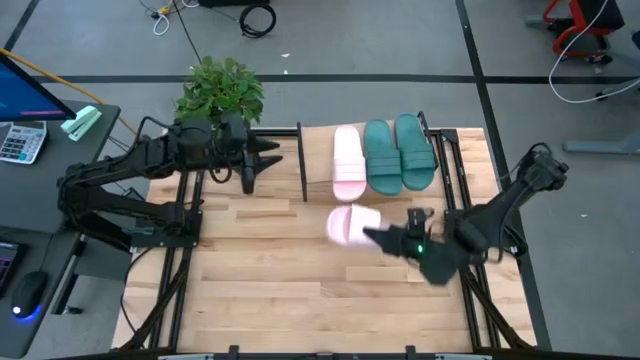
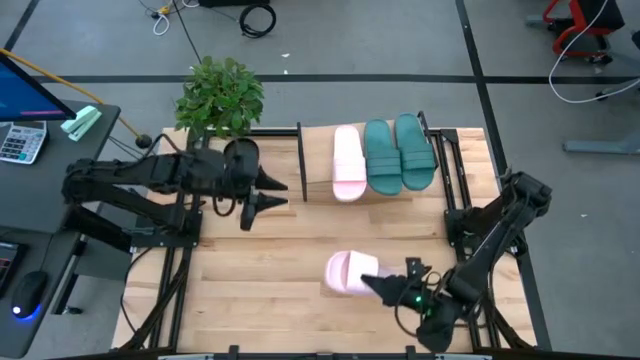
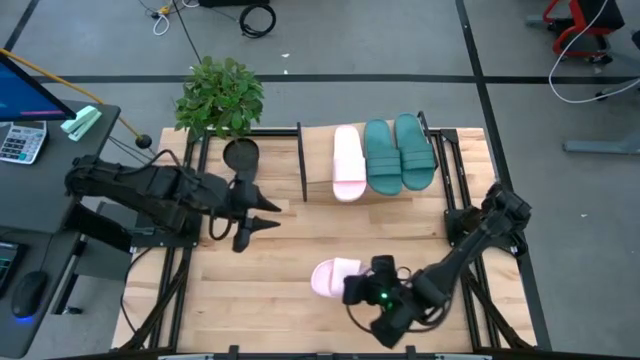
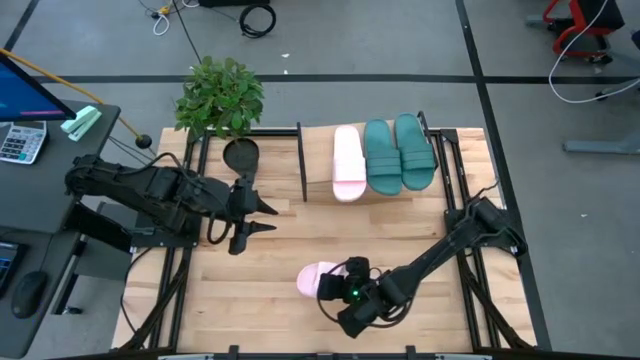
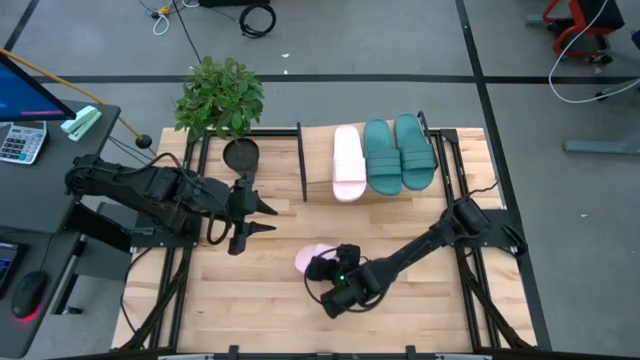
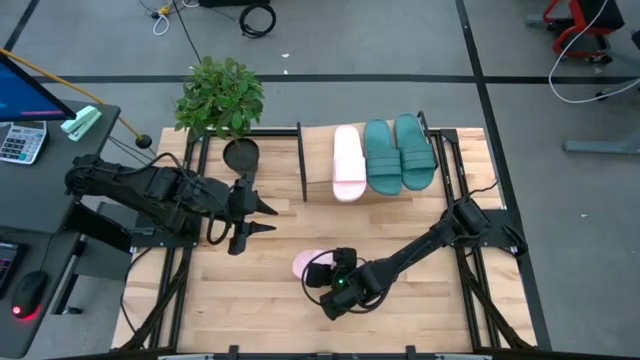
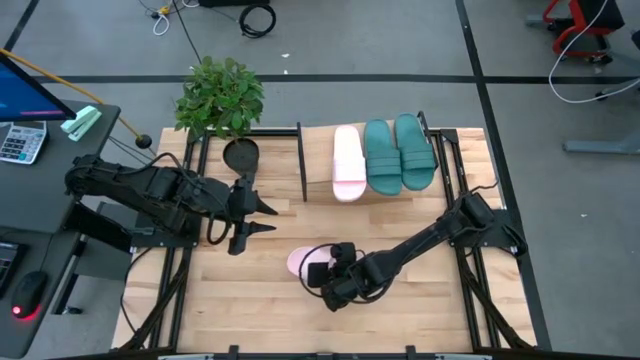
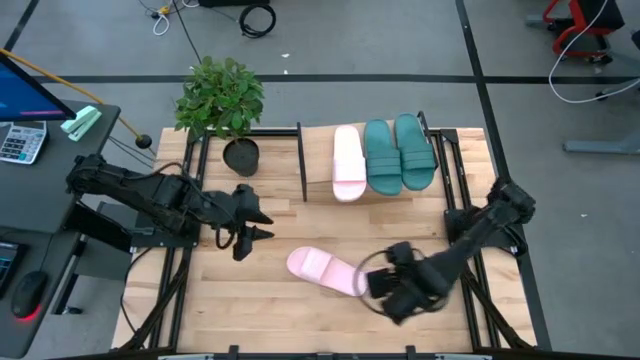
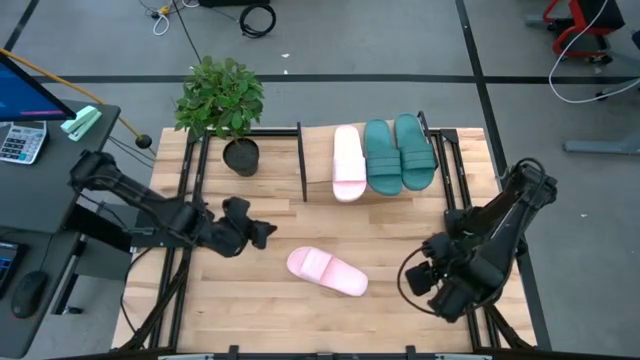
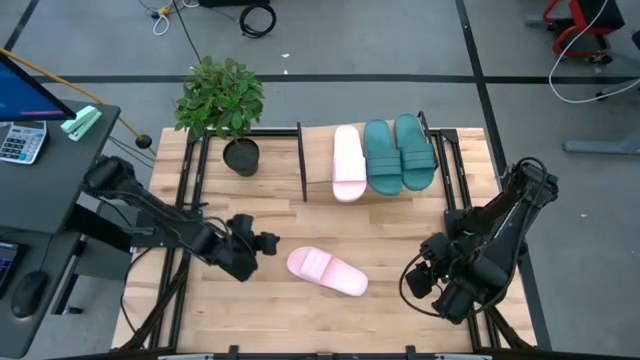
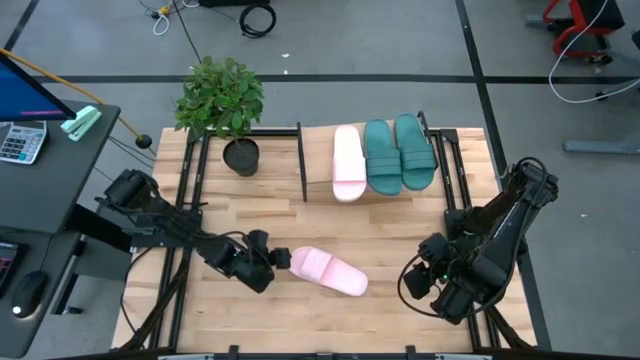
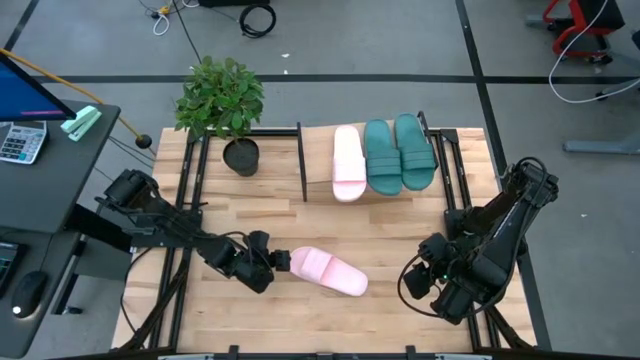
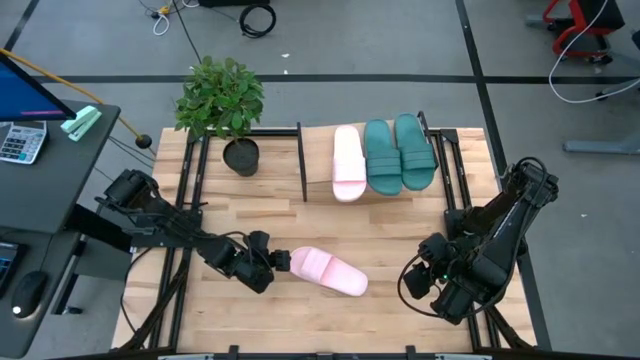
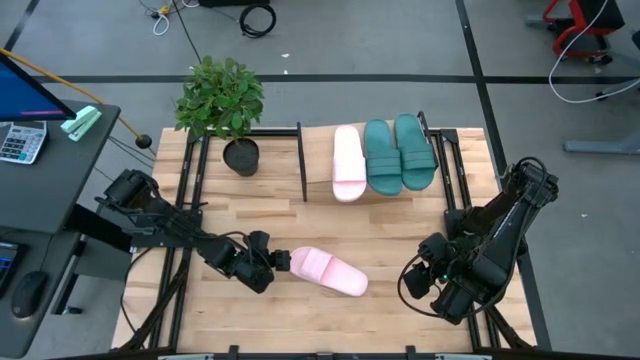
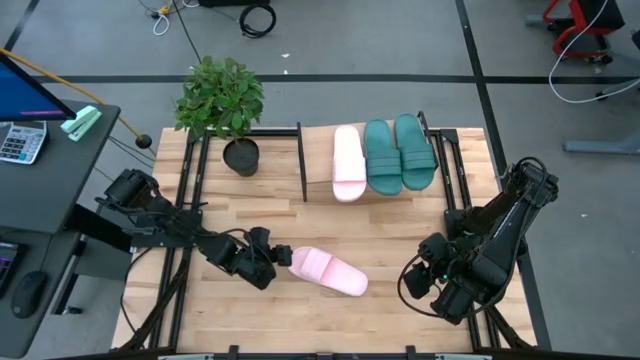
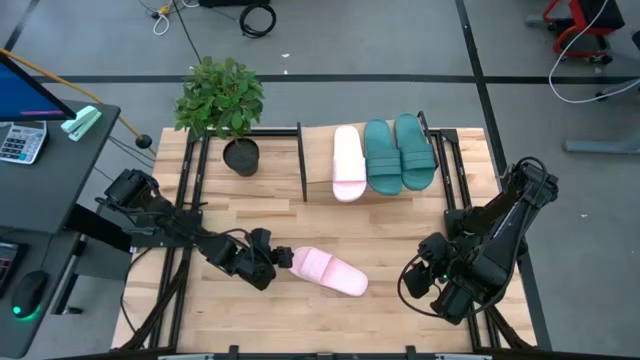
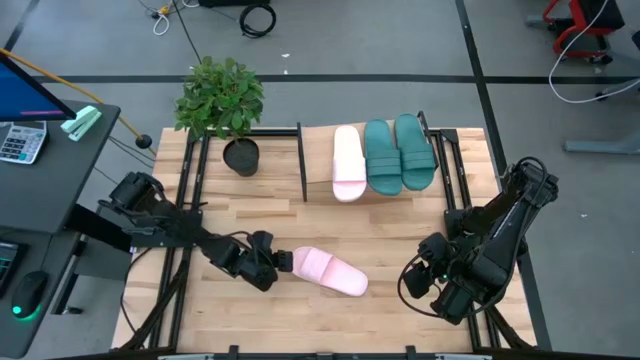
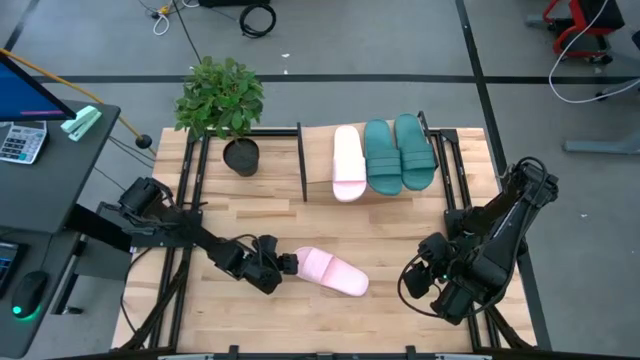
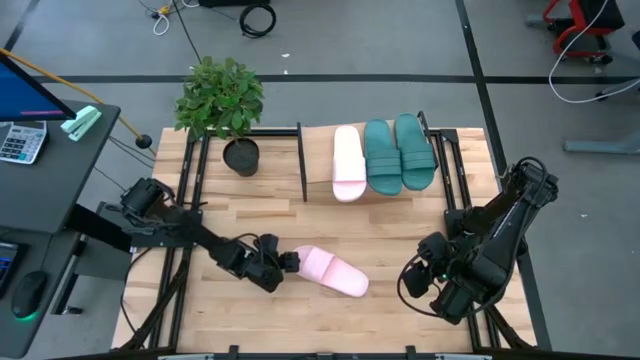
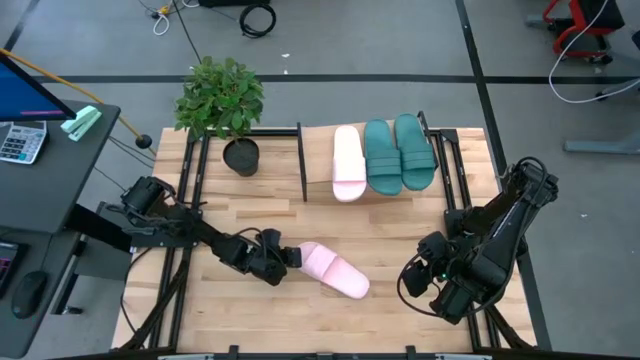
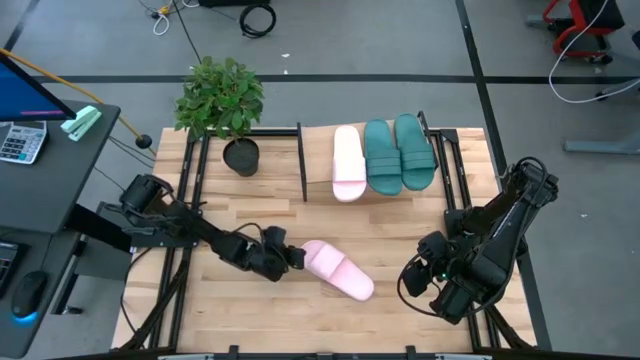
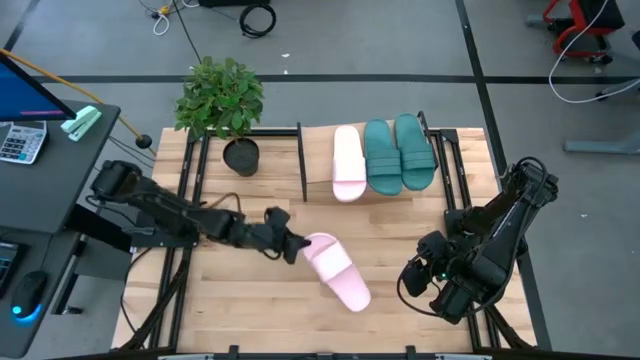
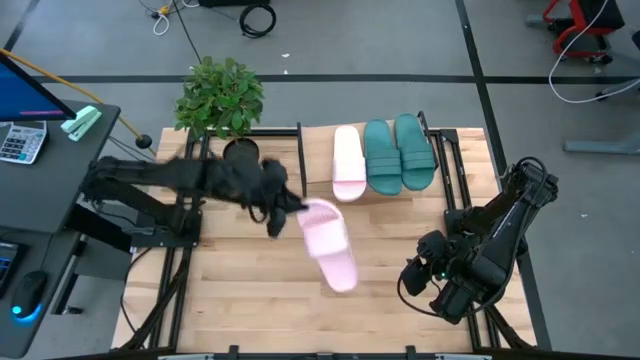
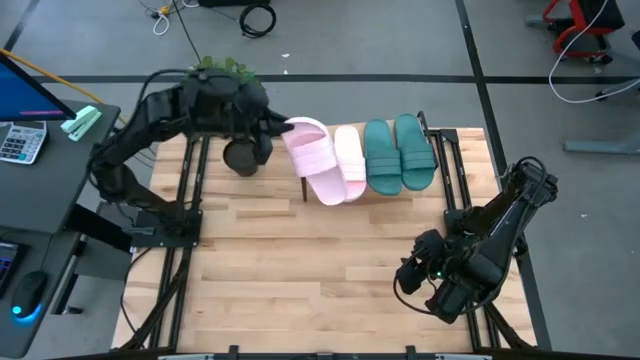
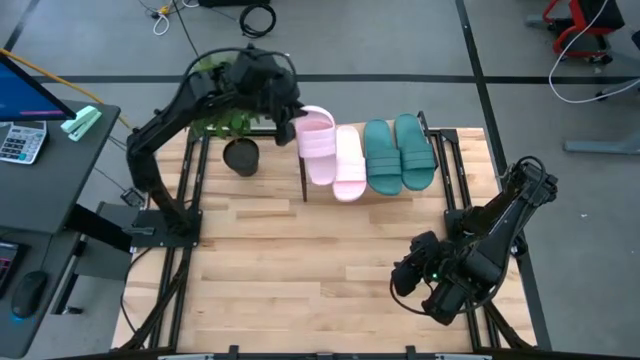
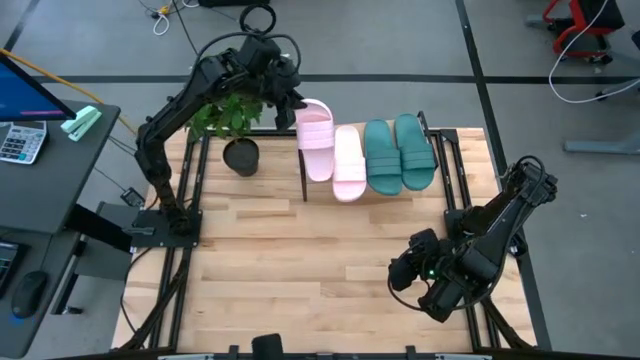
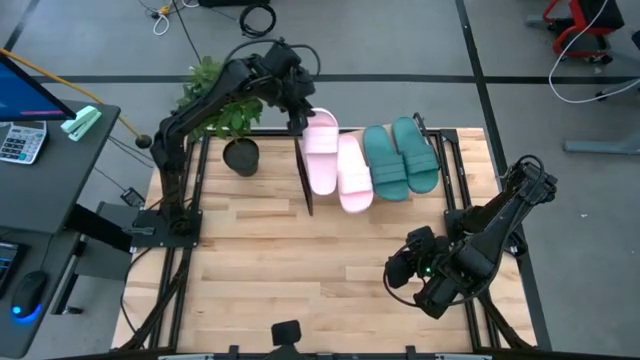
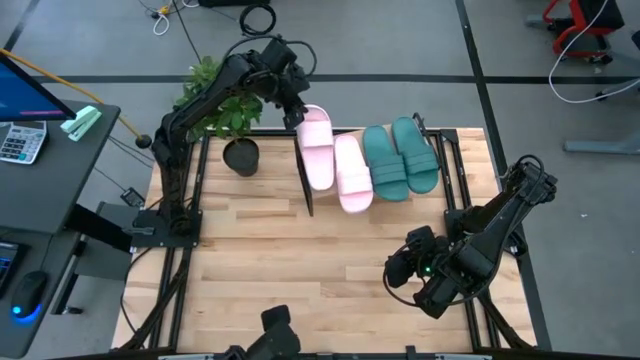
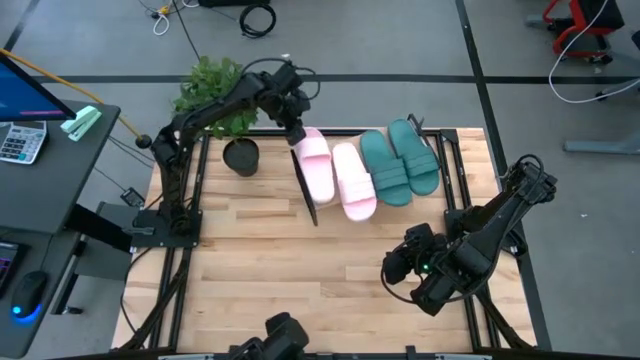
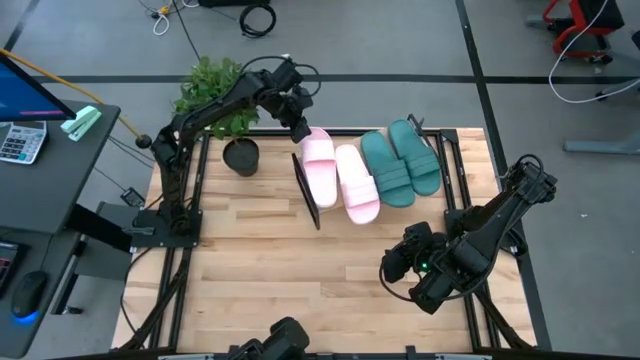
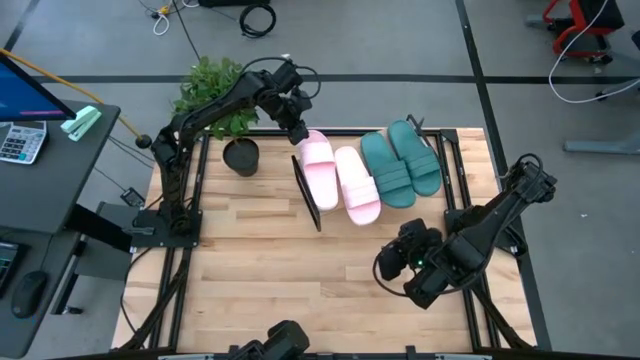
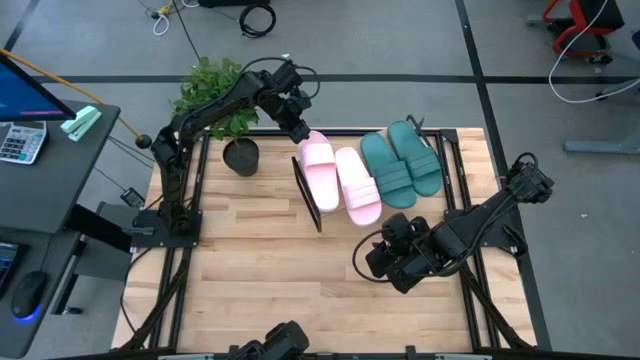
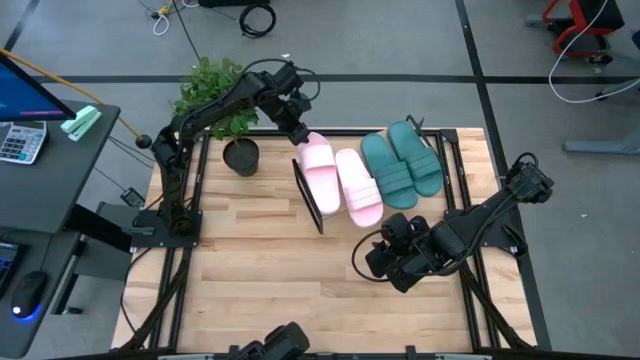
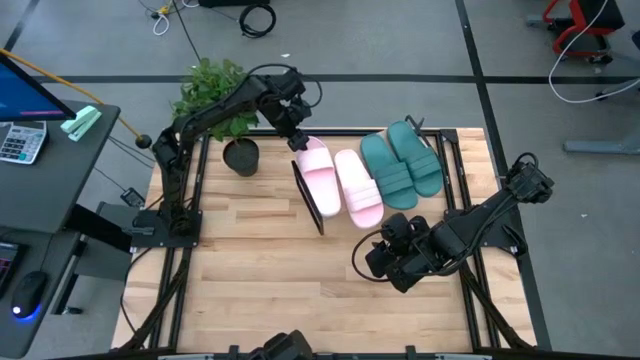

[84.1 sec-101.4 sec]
Task: Pick and place slides into the shelf
Put the pink slipper on the shelf

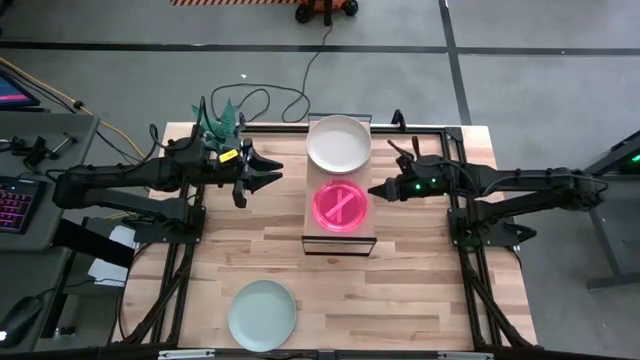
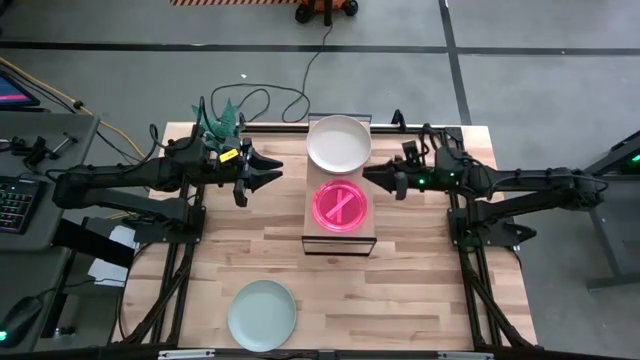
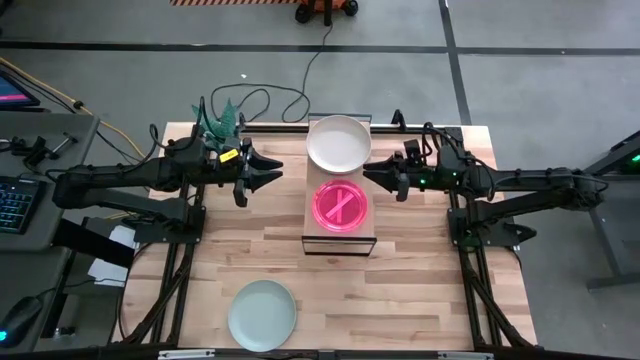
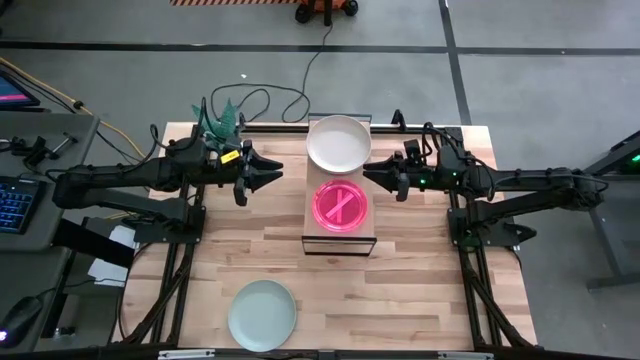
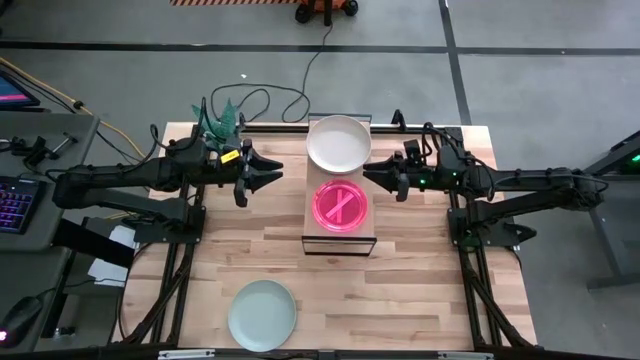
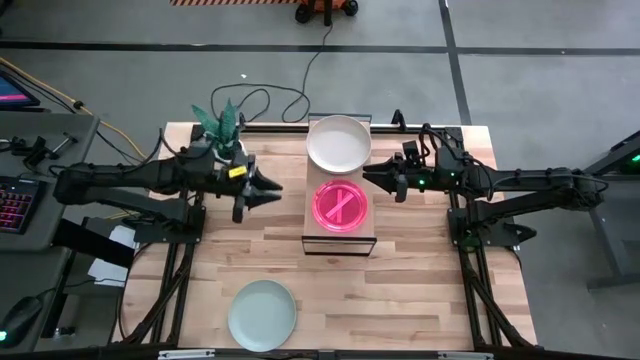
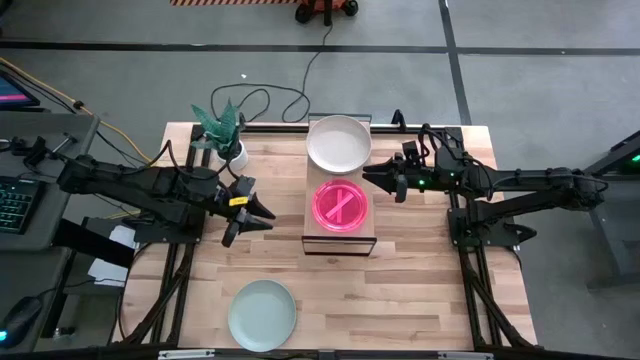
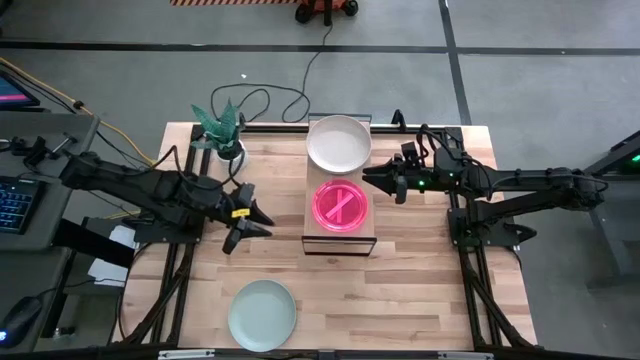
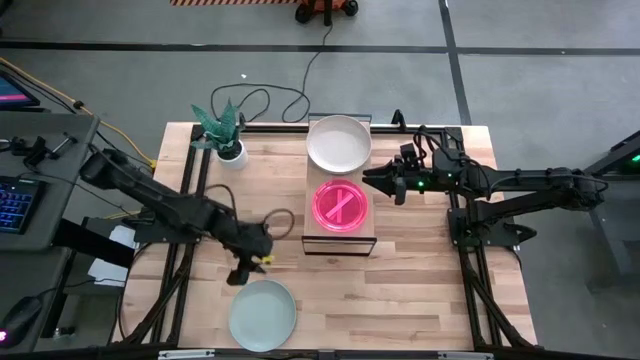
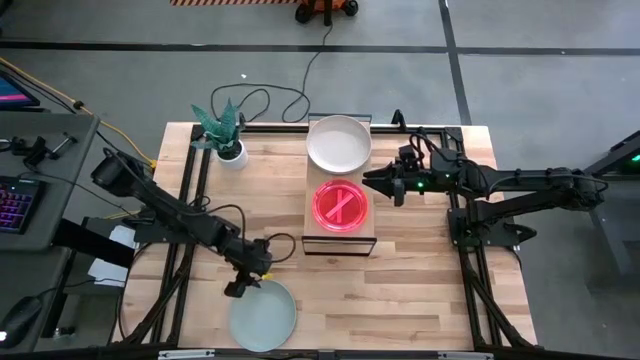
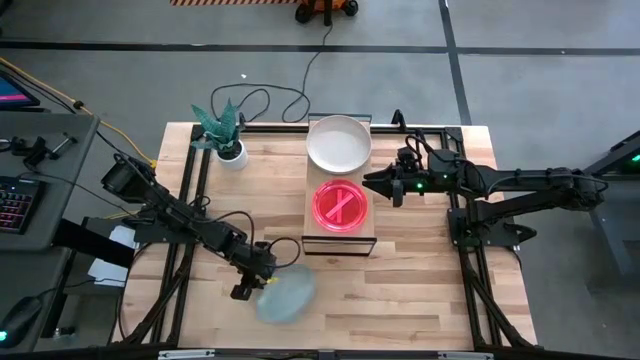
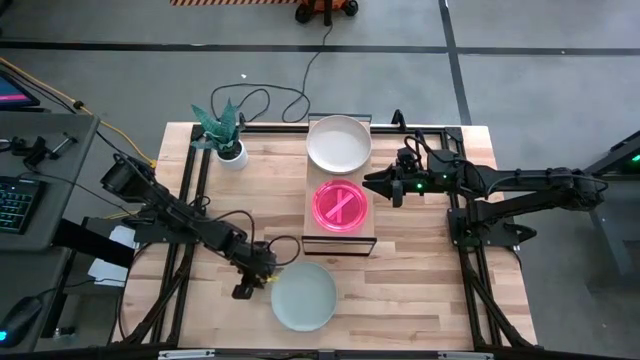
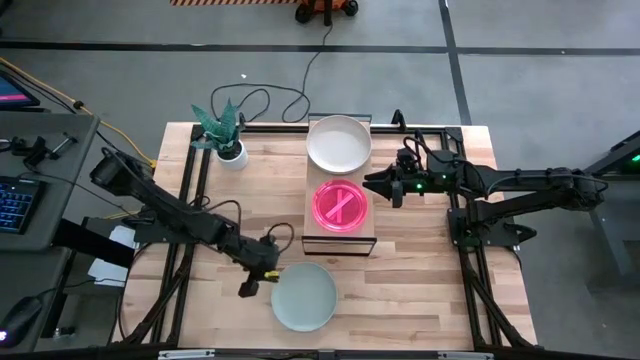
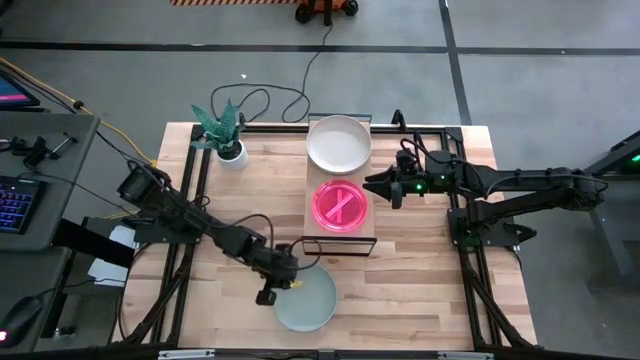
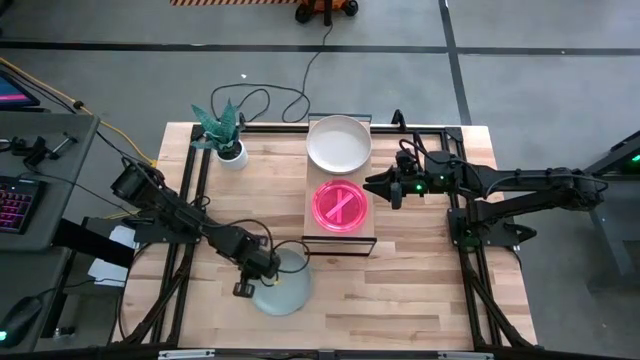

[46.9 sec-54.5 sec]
Task: Place and stack plates onto a shelf
Stack the white plate on top of the stacked light brown plate on the shelf
